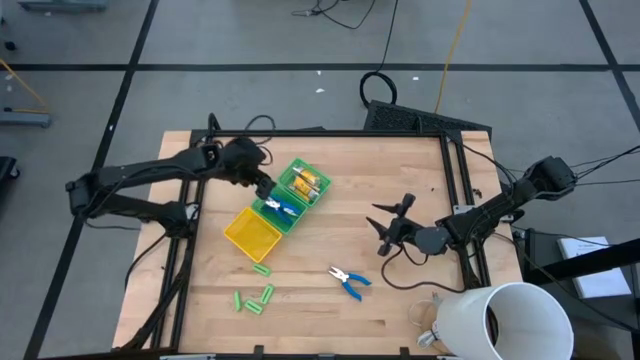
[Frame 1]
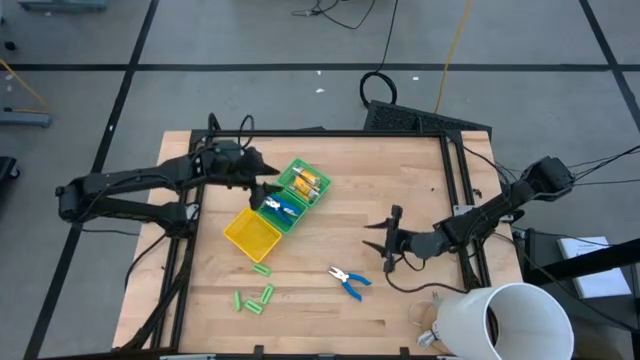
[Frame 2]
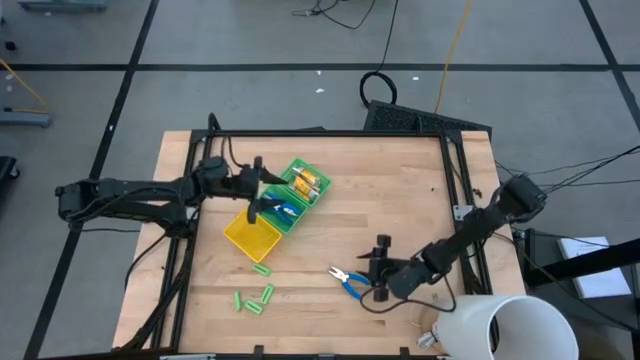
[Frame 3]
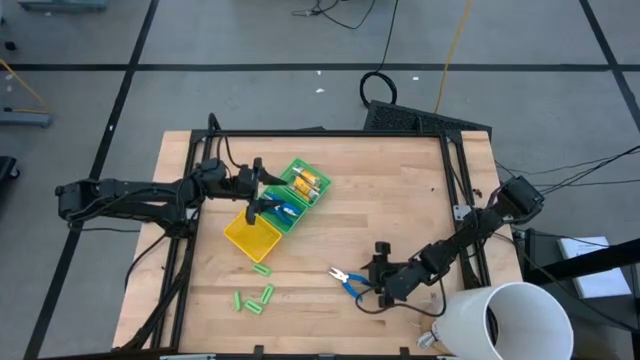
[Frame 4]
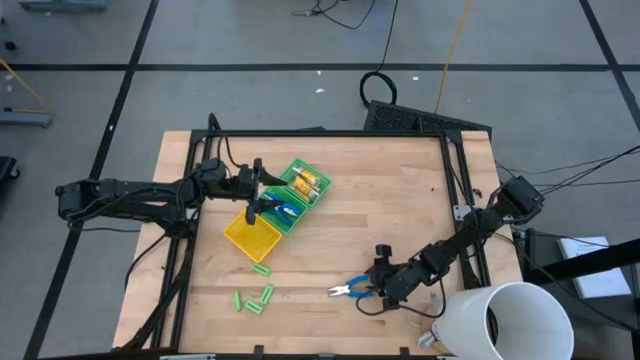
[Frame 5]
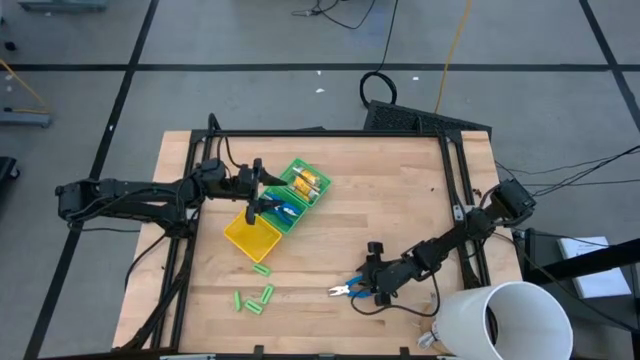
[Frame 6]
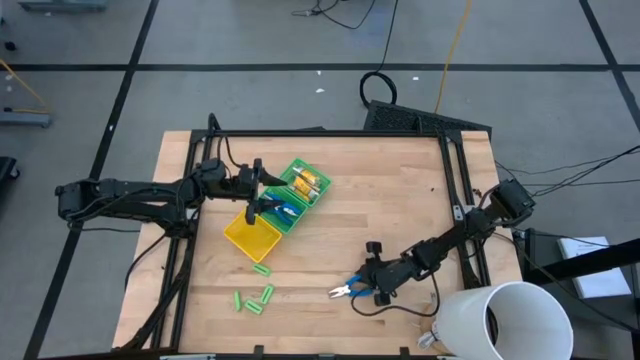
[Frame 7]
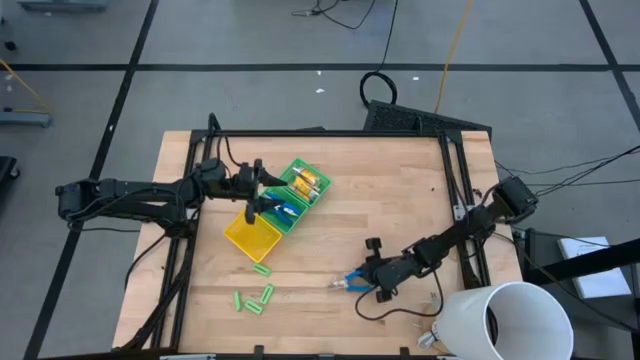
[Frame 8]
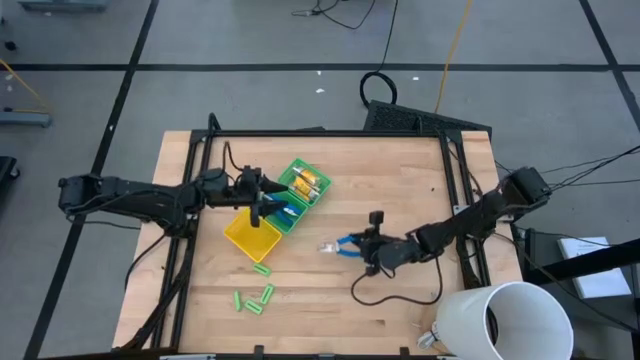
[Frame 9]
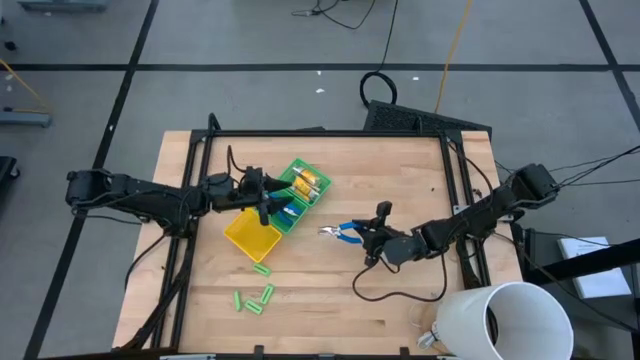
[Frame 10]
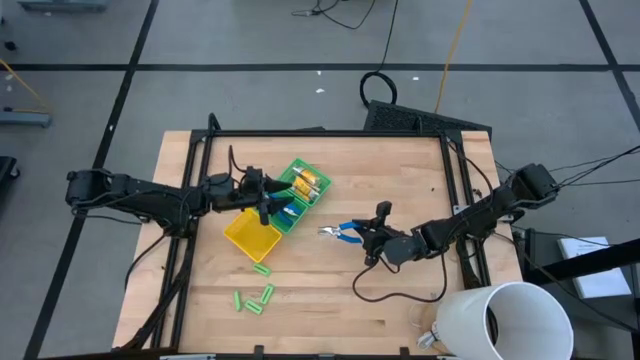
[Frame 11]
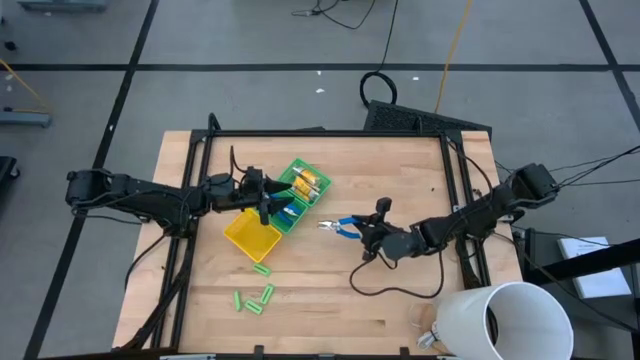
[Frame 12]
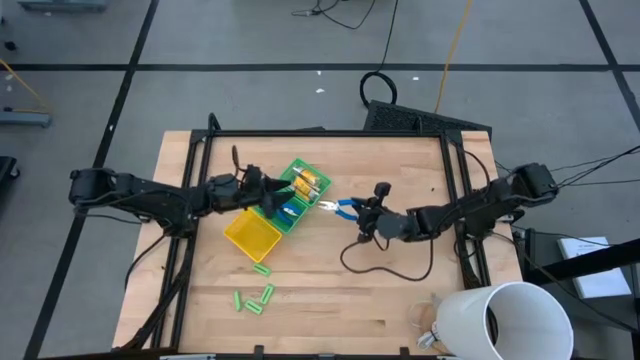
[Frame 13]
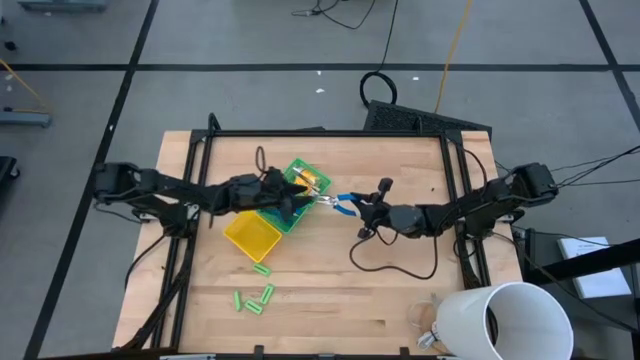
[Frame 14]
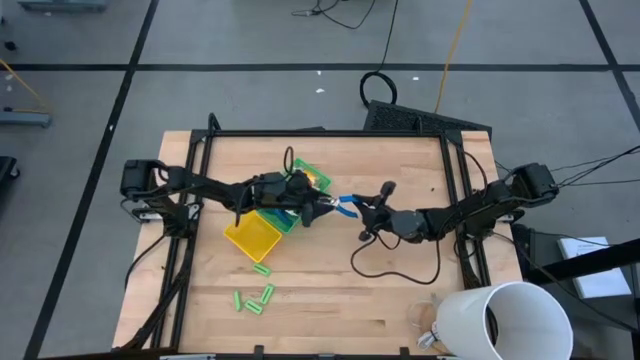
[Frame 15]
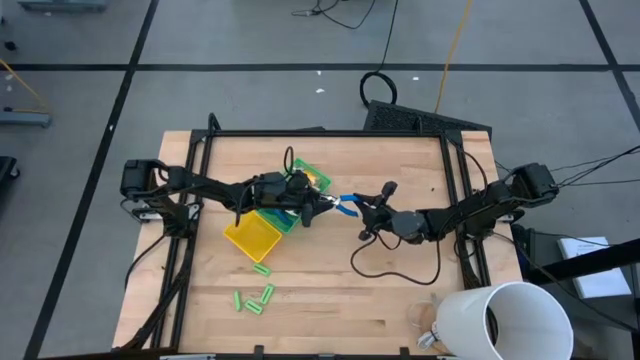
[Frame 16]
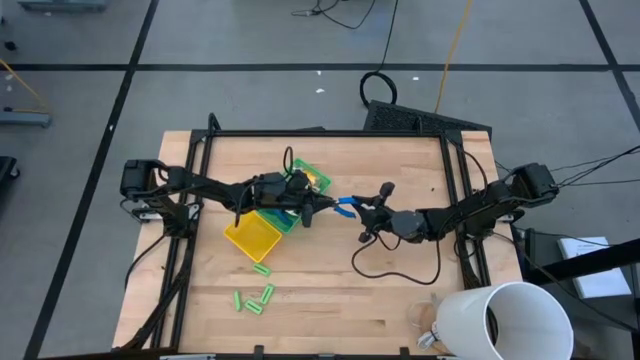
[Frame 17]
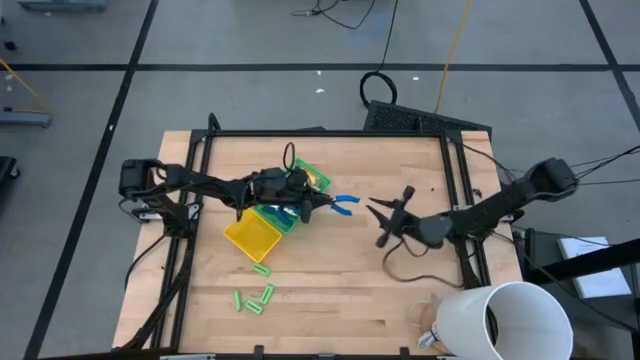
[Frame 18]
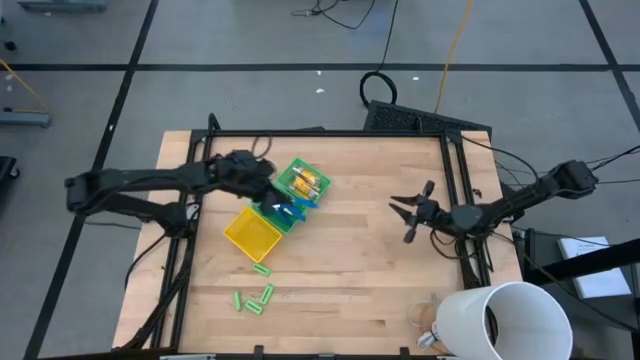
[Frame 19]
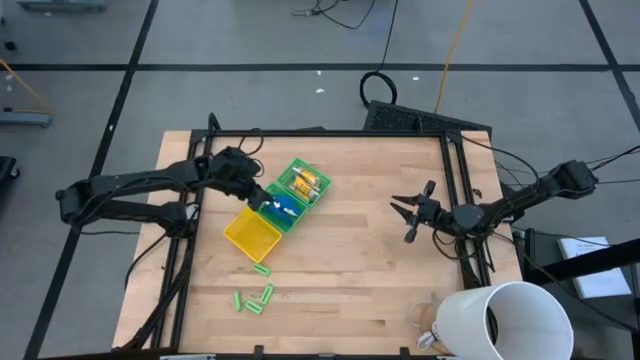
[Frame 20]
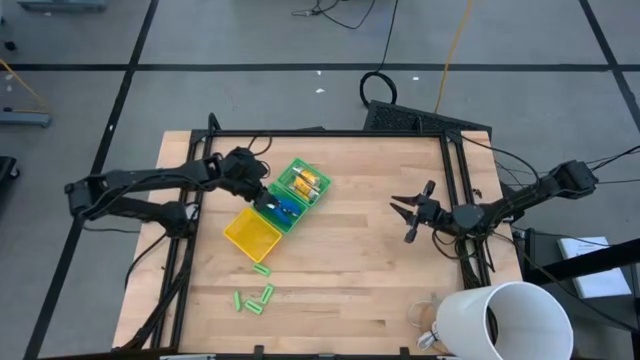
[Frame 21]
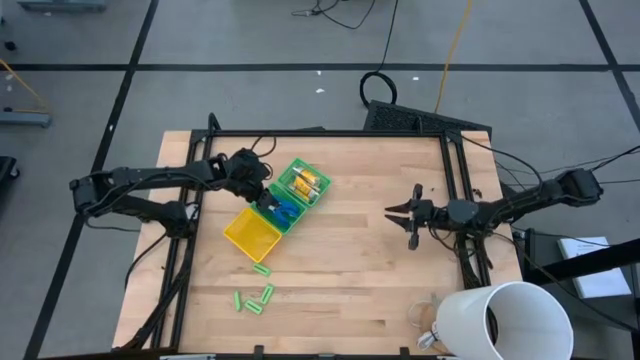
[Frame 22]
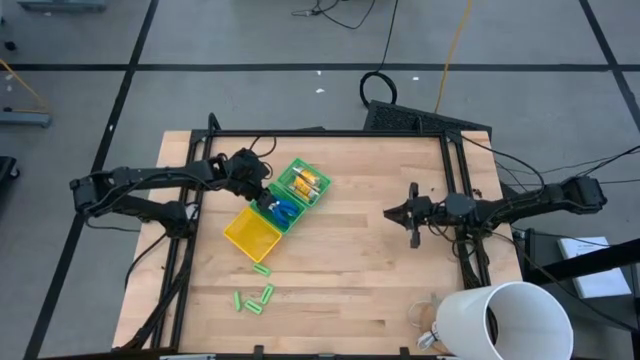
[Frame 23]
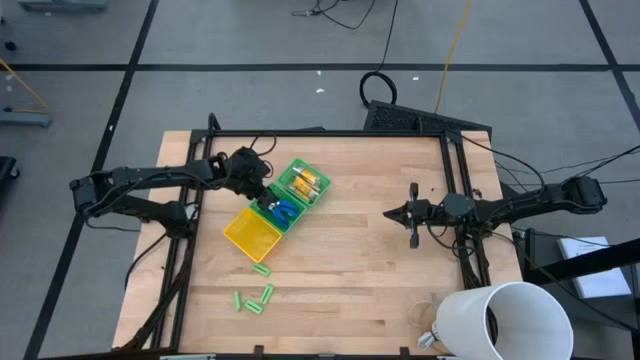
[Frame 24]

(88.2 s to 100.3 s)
Task: Pick & Place School Supplies
Put the blue hole puncher into the bottom green bin

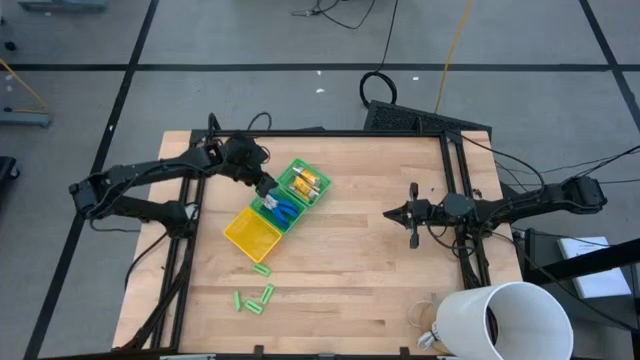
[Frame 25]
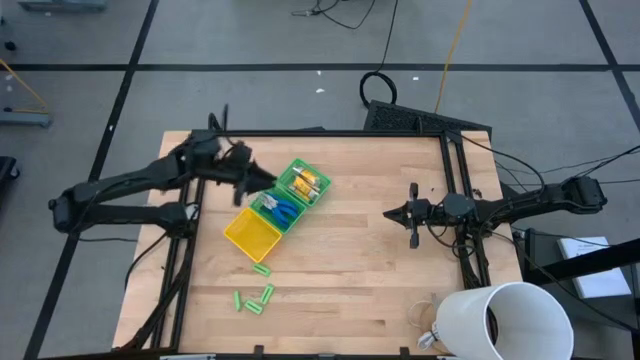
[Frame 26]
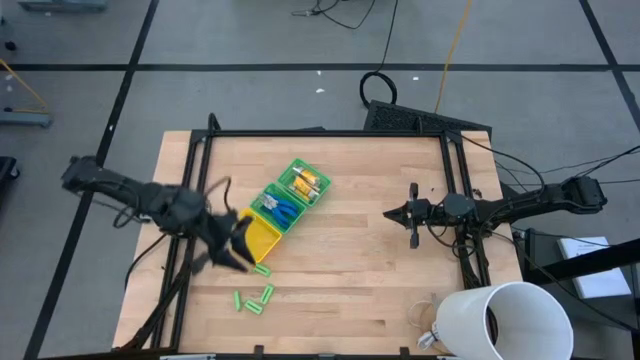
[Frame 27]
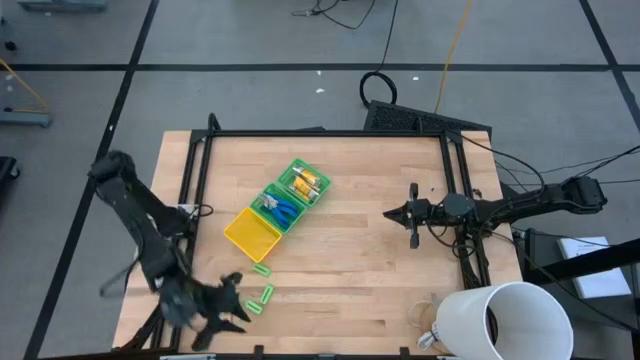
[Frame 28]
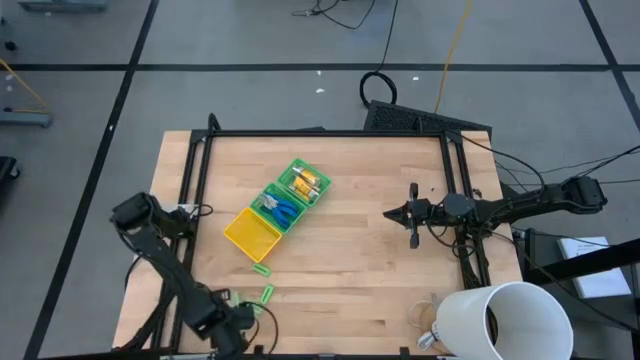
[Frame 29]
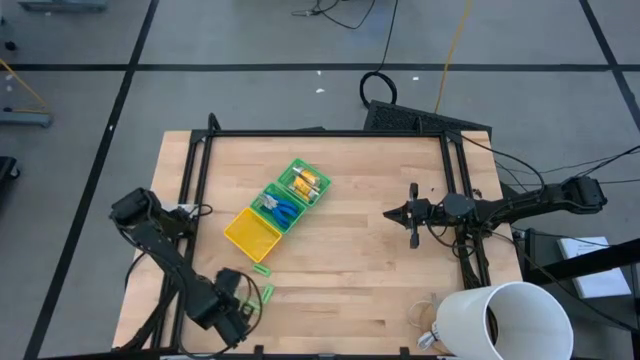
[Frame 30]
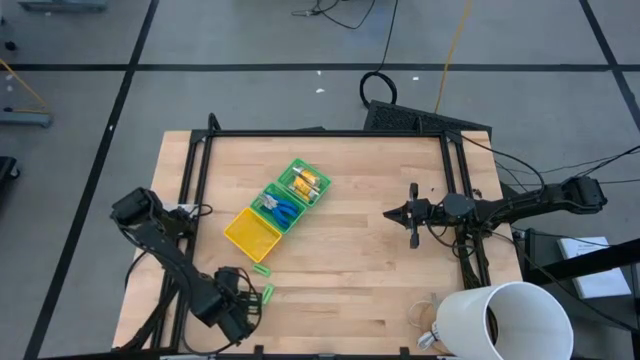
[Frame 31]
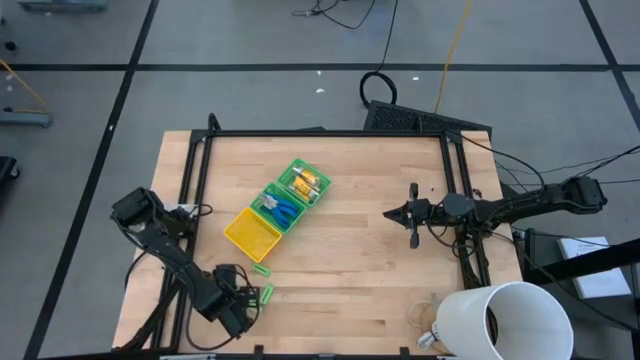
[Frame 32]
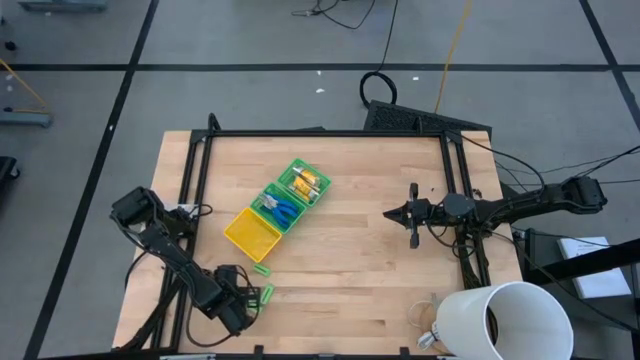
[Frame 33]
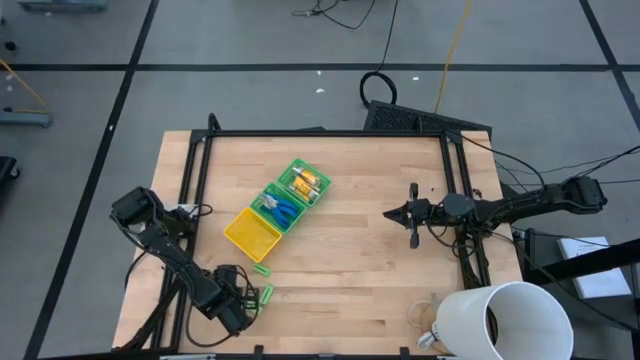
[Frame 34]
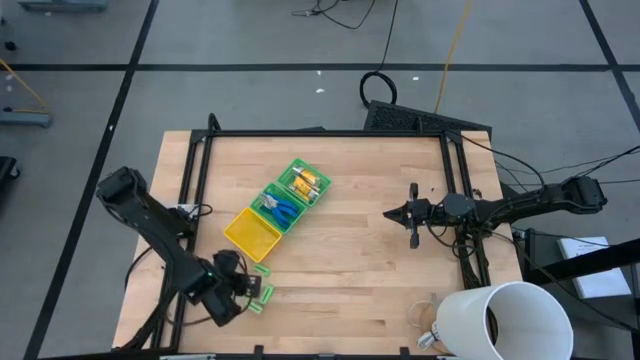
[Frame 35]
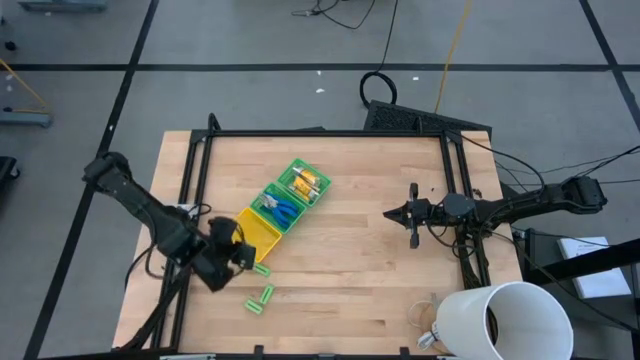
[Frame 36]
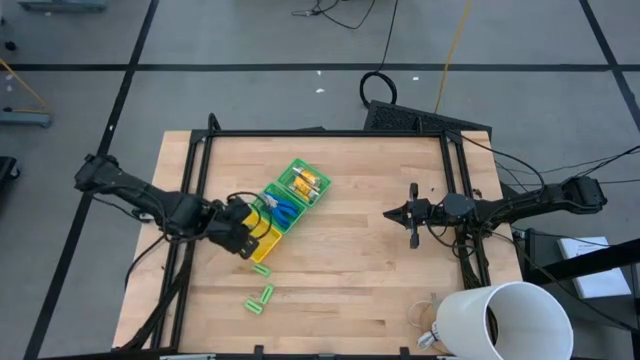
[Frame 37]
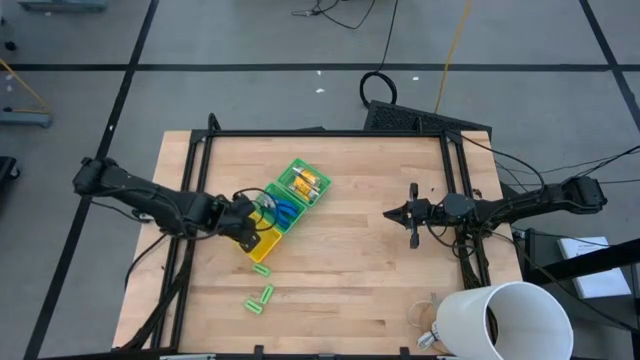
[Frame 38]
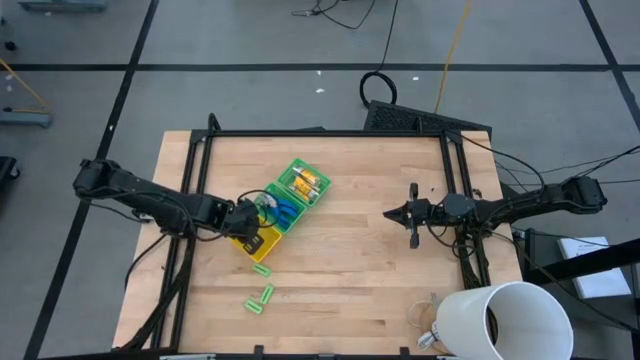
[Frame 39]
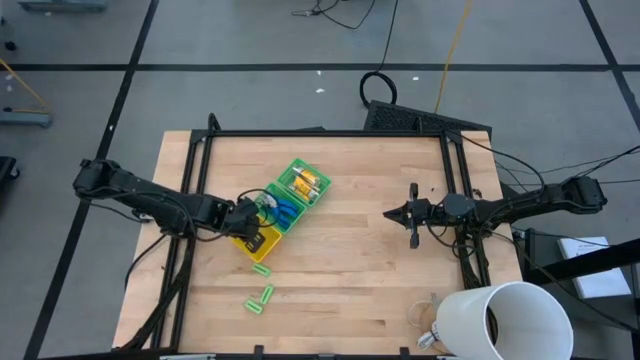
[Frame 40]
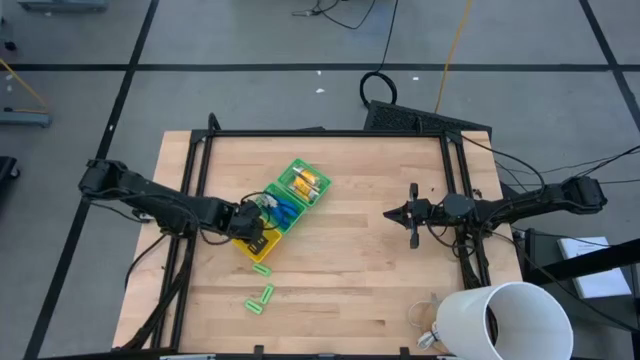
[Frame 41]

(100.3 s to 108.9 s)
Put the green eraser into the yellow bin
